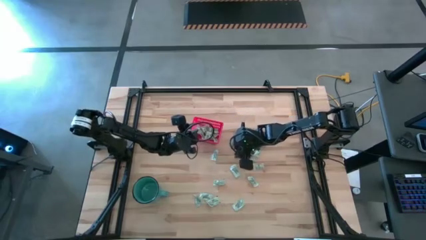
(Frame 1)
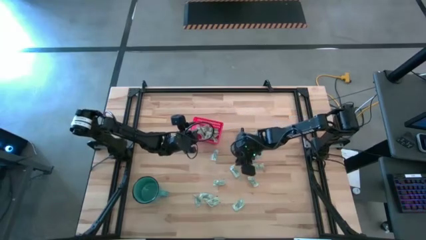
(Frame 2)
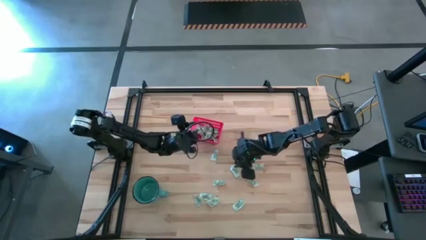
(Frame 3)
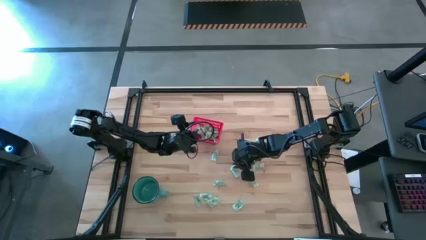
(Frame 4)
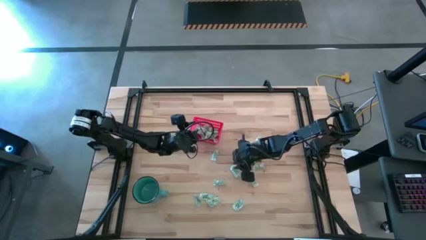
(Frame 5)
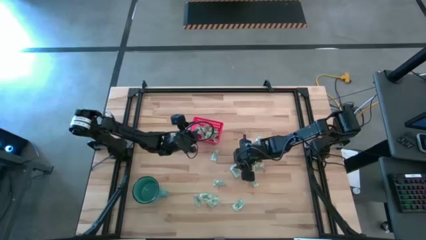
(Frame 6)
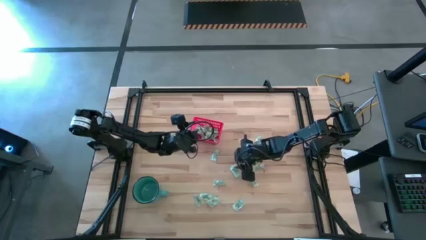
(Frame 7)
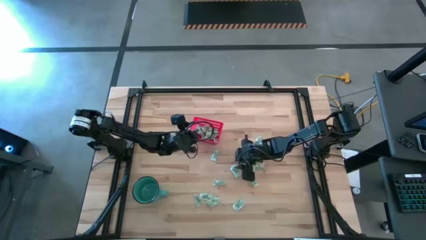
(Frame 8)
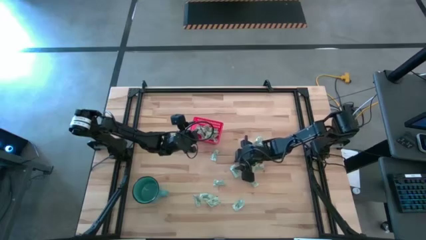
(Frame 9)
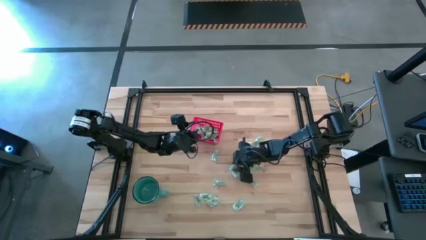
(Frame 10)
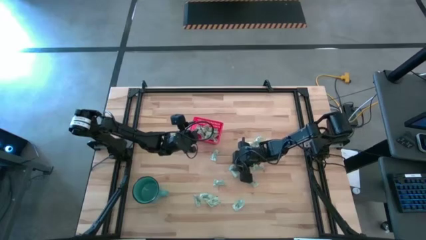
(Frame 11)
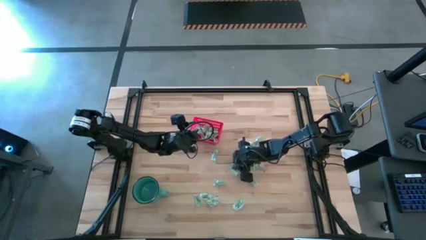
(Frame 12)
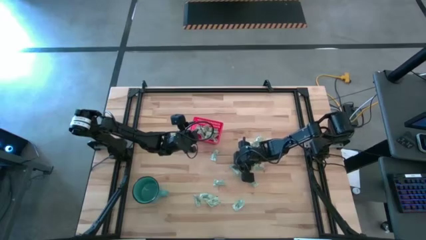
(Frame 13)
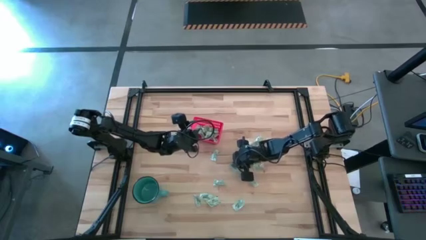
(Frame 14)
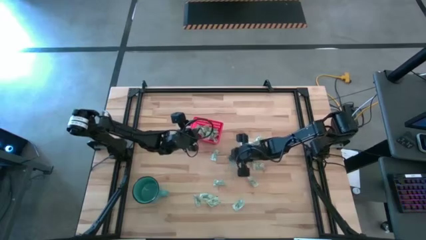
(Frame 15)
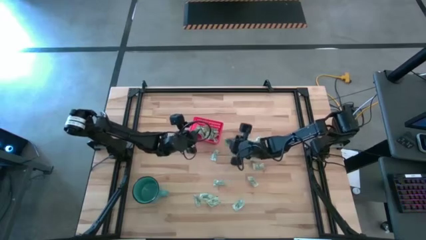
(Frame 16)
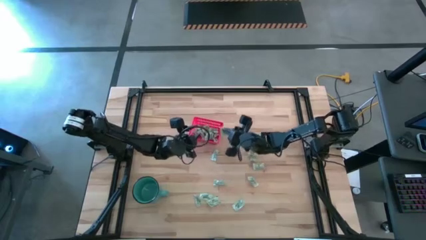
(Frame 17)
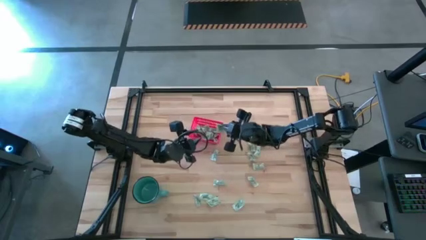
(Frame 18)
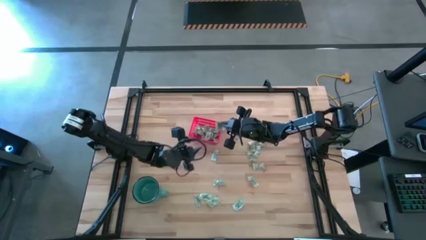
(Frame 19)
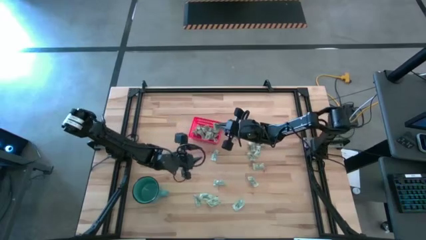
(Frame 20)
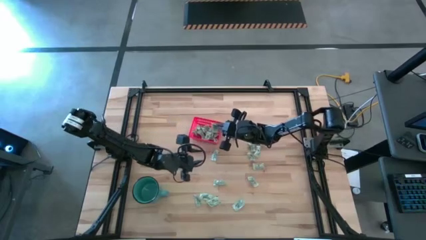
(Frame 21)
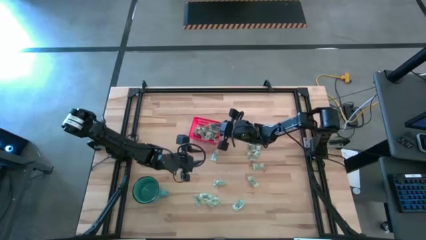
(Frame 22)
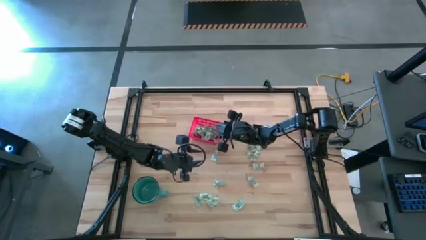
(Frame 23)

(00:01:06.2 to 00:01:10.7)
Task: Pick and place items into bin
Put the stevia packet into the red bin

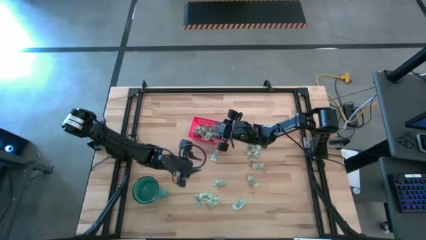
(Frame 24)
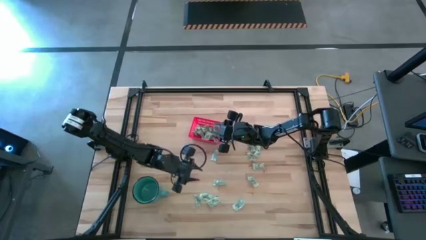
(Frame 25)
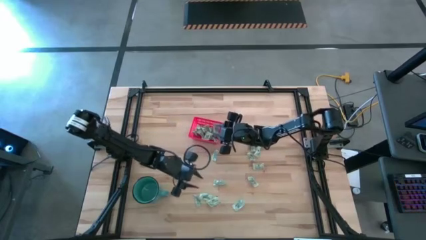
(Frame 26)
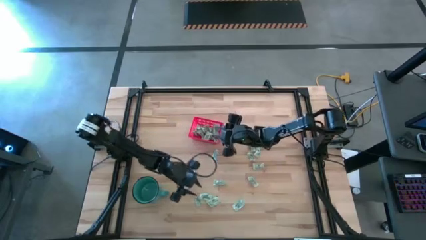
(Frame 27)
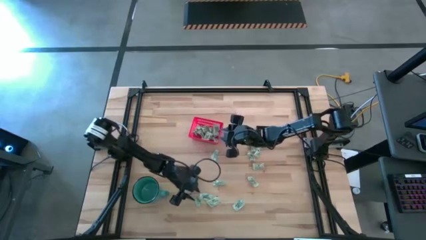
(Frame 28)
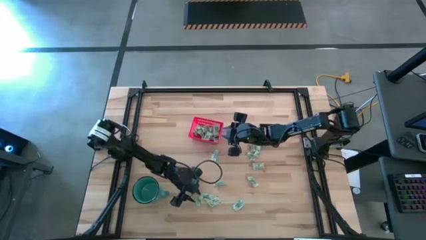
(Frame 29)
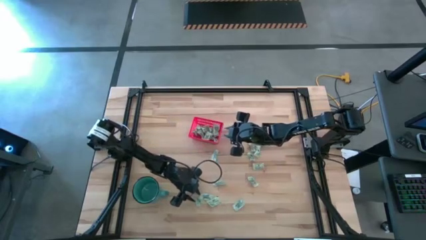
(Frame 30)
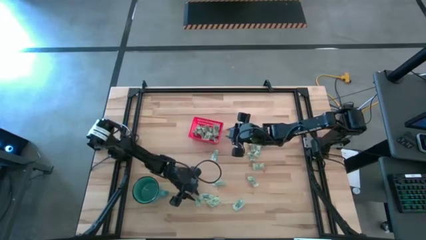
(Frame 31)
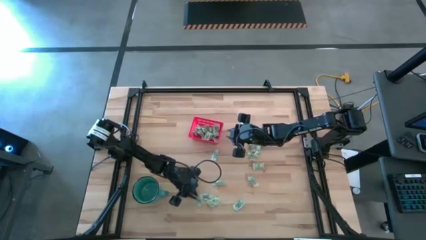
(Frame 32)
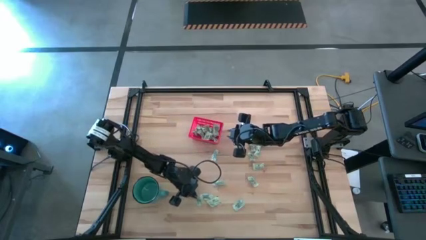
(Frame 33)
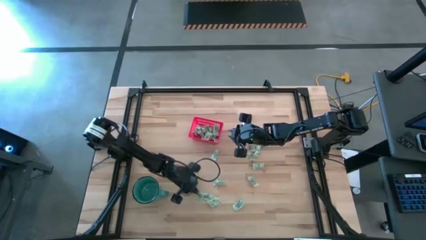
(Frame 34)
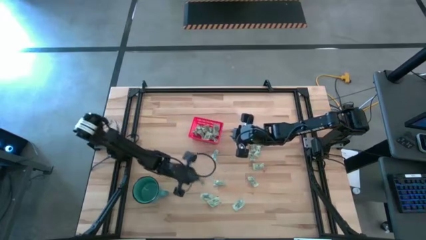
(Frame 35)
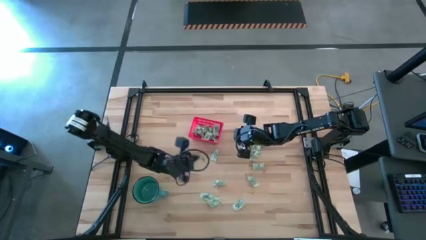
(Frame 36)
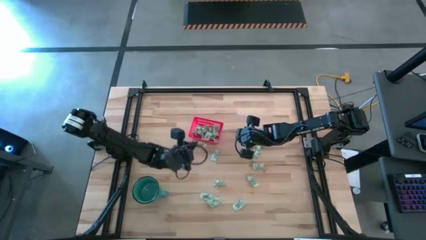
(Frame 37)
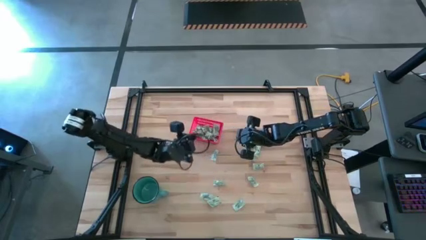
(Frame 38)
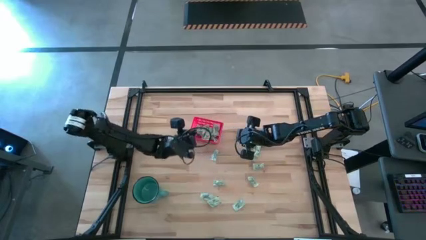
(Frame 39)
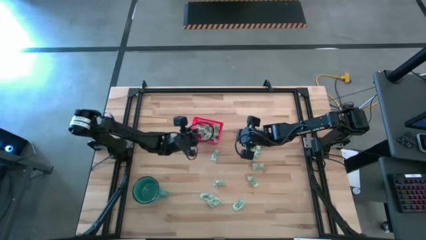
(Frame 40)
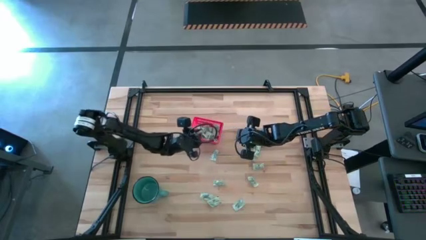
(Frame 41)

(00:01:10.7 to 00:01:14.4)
Put the stevia packet into the red bin

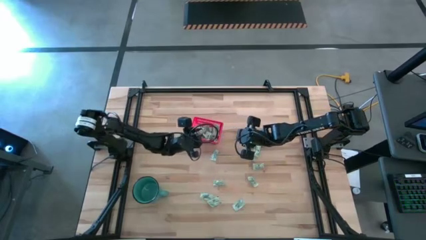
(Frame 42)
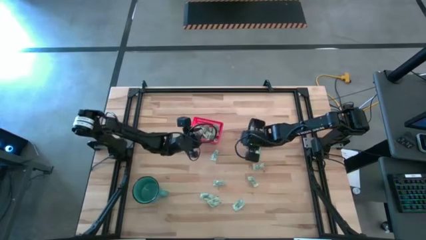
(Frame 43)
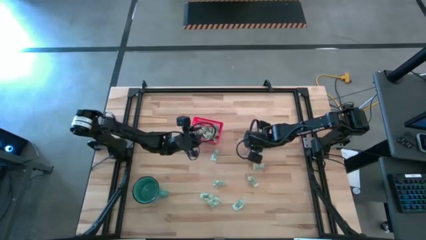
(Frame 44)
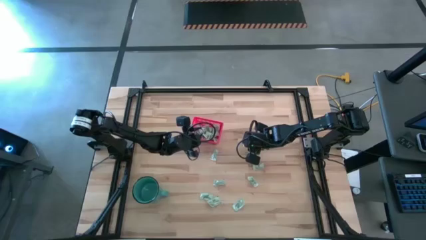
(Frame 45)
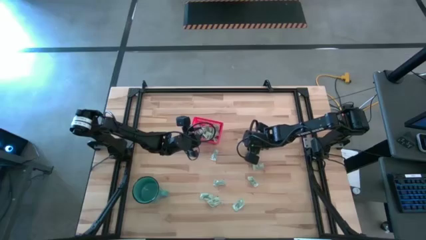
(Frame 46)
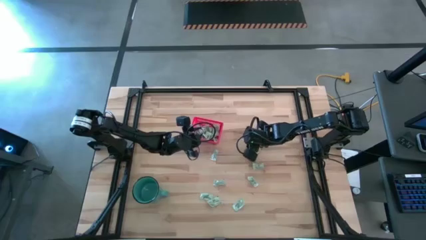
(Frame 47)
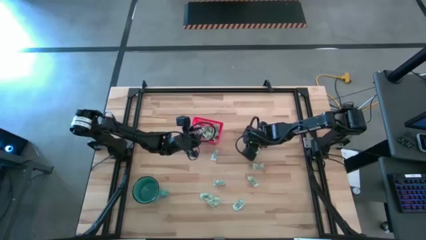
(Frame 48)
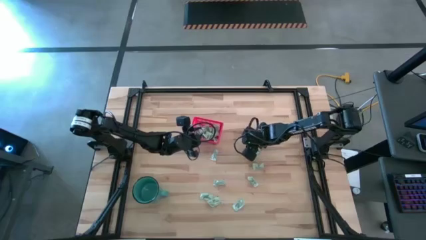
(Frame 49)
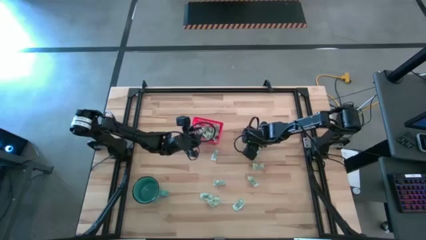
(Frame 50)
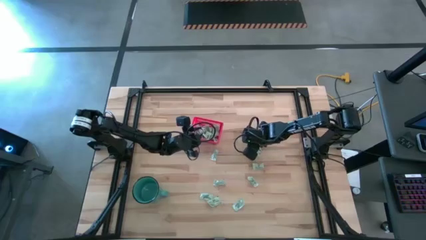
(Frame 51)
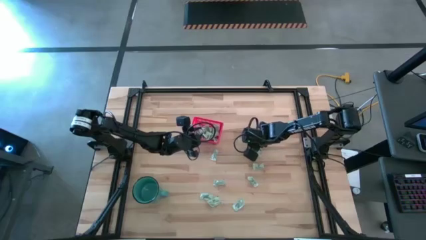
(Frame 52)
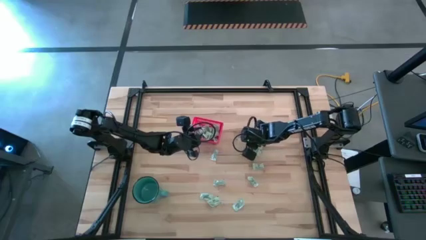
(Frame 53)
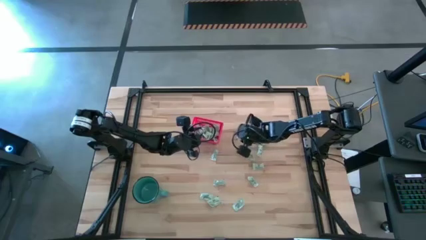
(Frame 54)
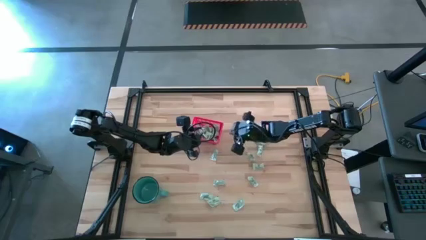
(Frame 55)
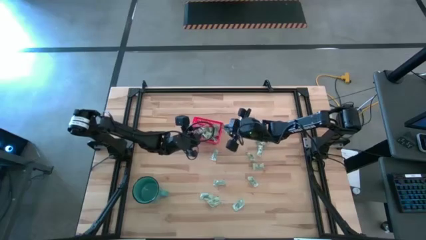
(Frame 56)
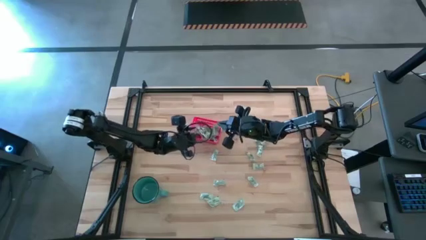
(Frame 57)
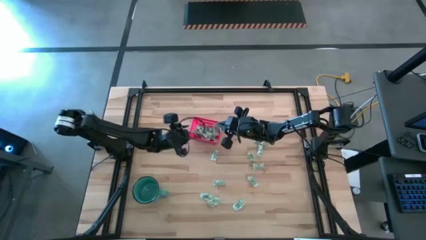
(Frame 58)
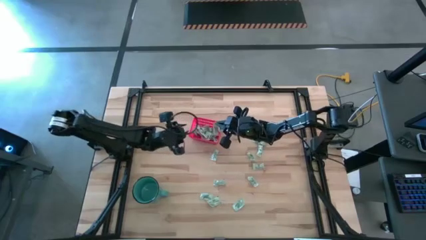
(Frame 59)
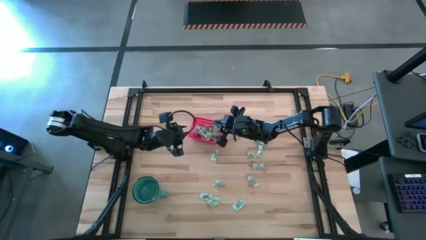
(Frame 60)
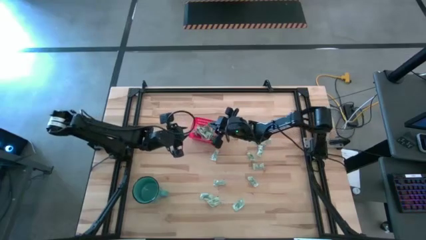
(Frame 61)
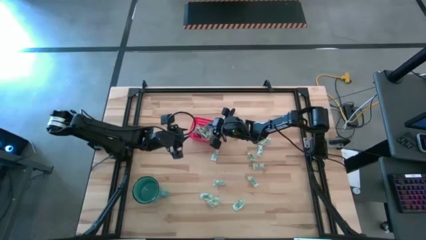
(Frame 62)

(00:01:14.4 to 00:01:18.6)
Put the stevia packet into the red bin

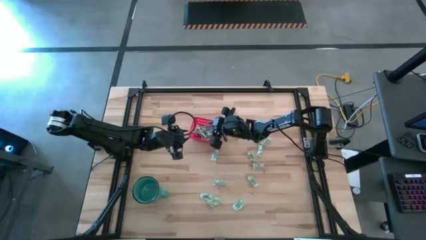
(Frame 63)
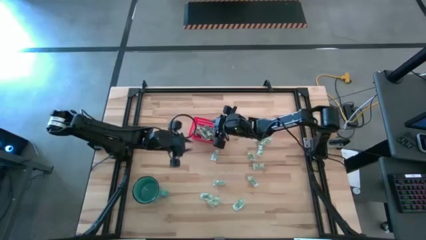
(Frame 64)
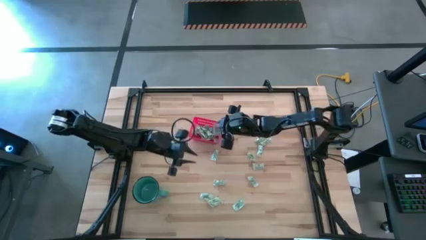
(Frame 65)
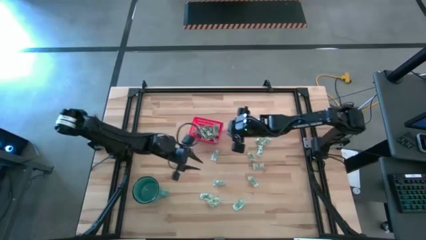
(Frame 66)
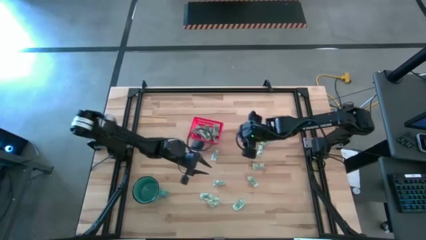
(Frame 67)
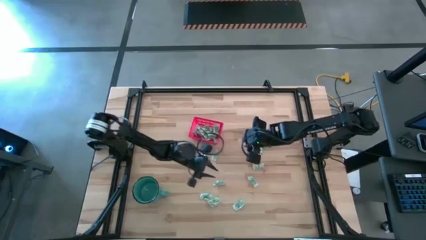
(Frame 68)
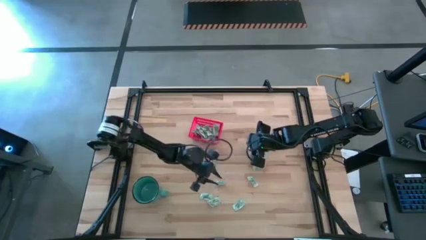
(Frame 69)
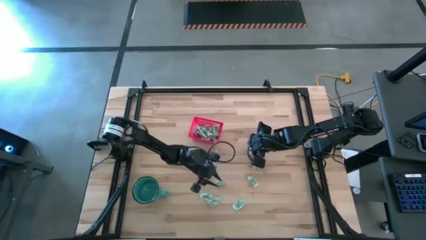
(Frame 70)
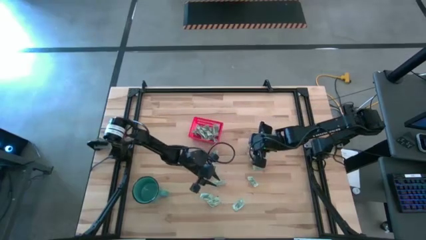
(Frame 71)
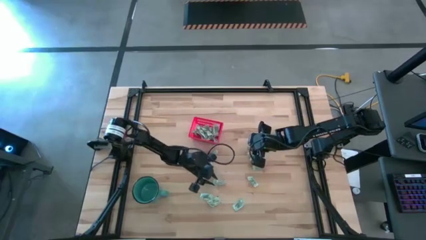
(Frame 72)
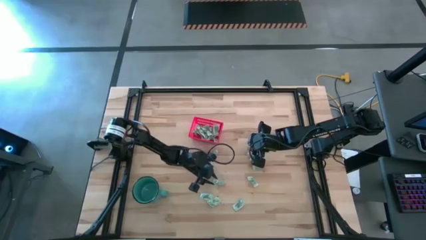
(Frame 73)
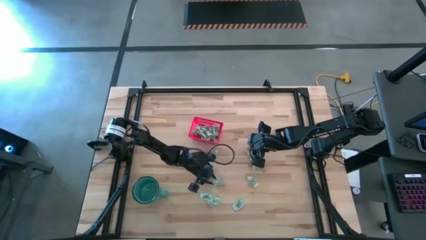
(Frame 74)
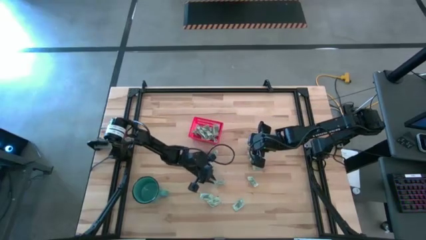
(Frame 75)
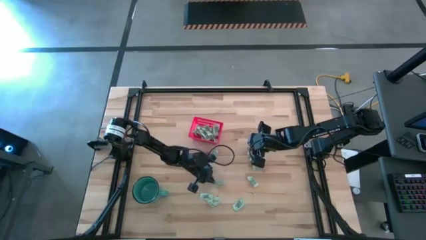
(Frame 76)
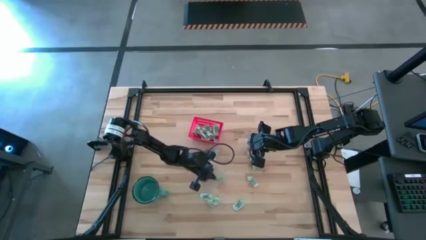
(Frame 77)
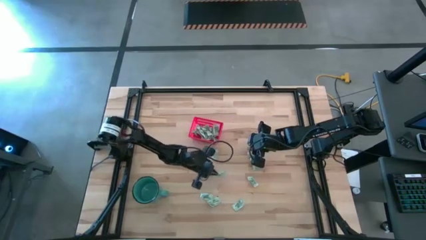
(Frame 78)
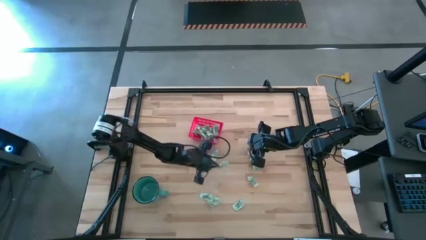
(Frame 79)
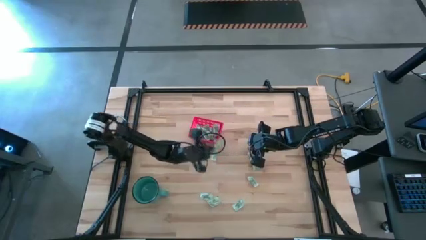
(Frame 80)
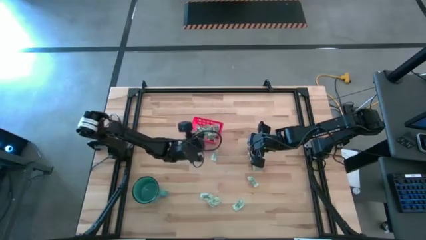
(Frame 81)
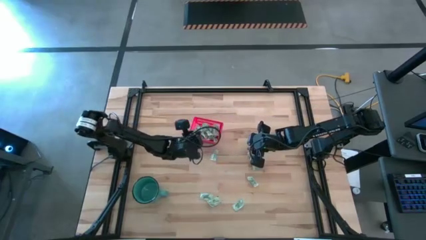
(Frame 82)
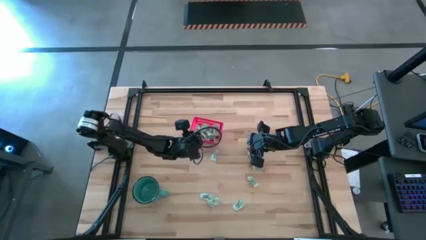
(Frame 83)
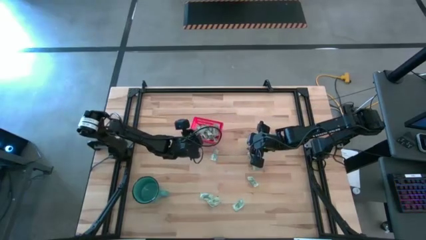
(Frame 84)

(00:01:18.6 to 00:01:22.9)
Put the stevia packet into the red bin
